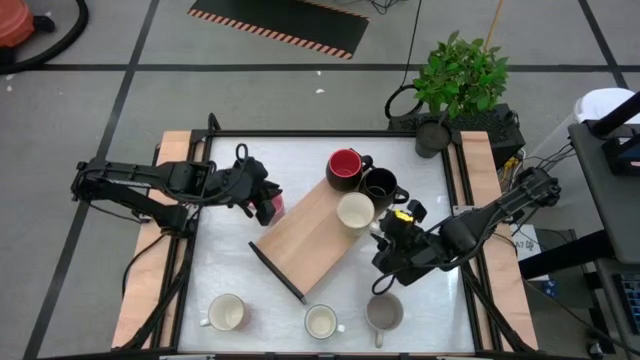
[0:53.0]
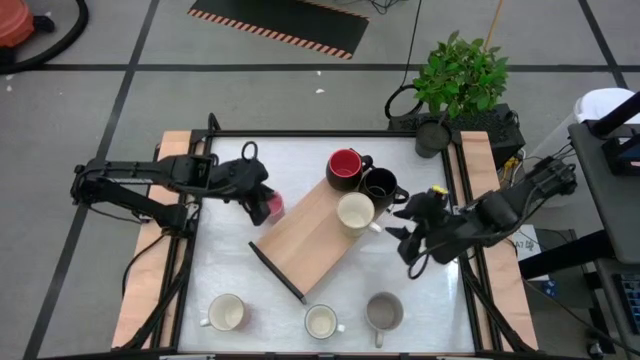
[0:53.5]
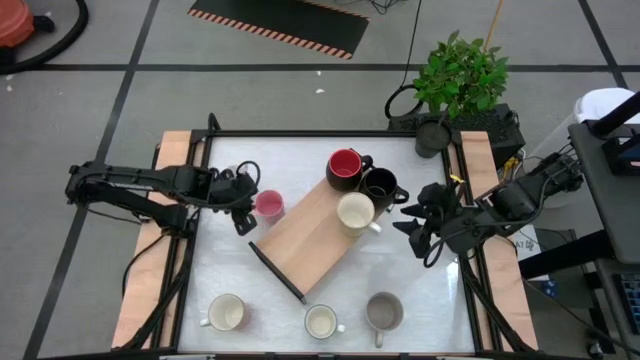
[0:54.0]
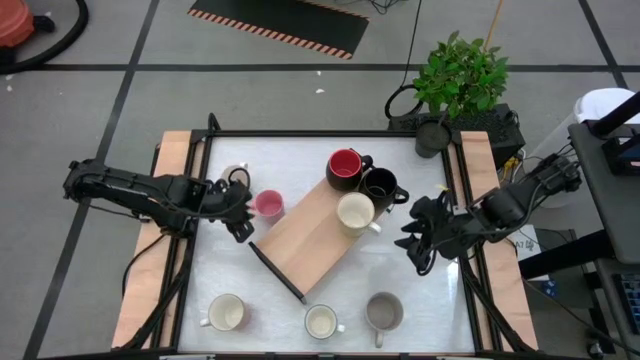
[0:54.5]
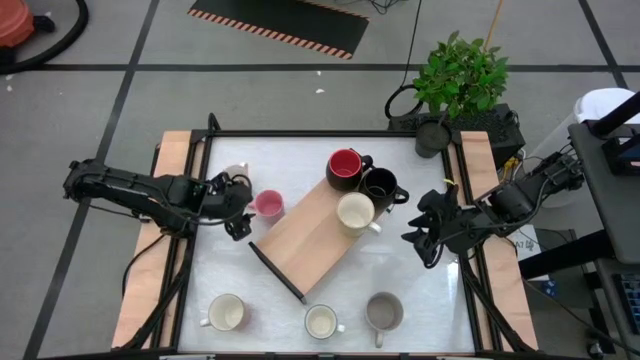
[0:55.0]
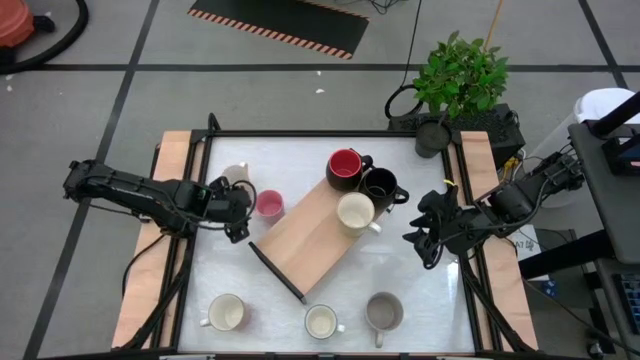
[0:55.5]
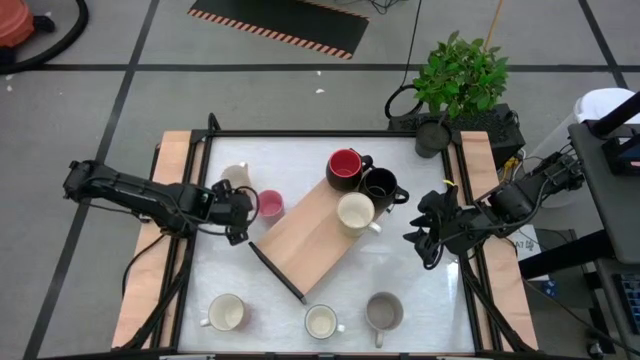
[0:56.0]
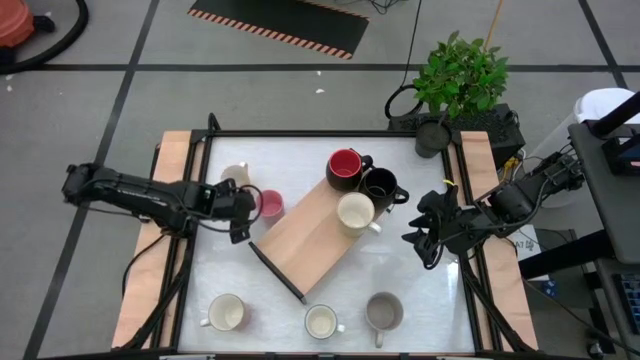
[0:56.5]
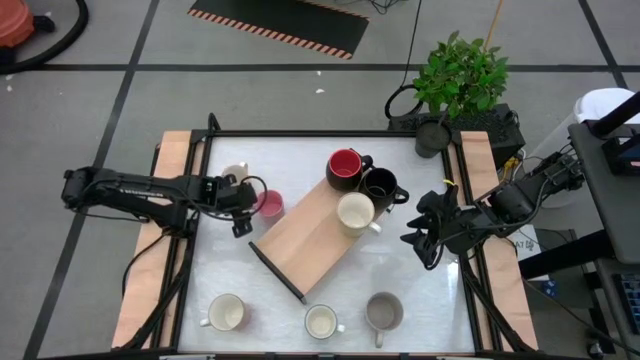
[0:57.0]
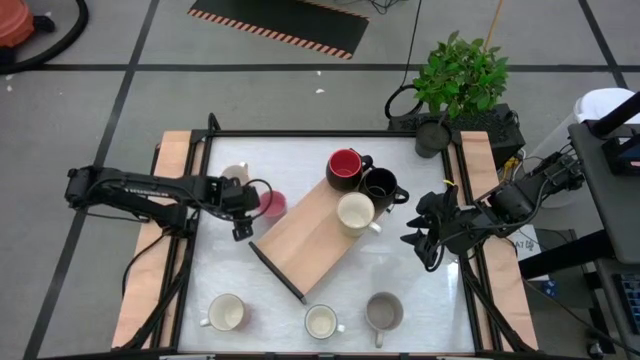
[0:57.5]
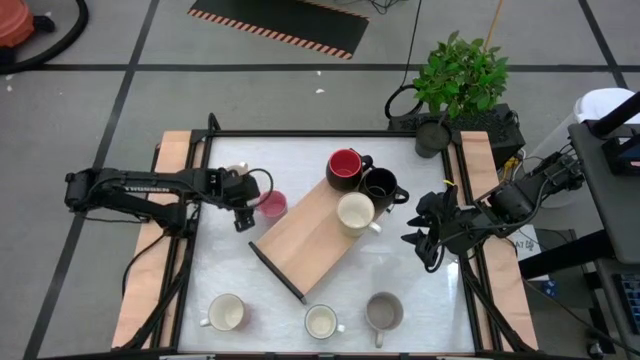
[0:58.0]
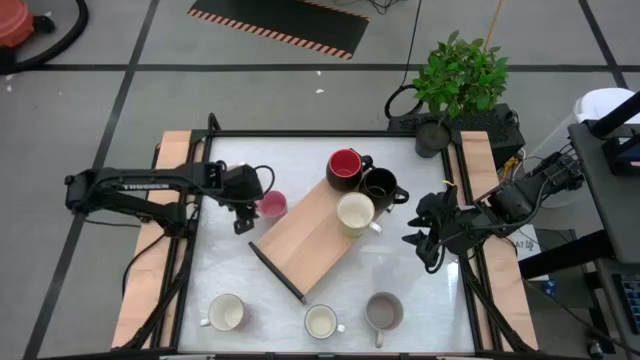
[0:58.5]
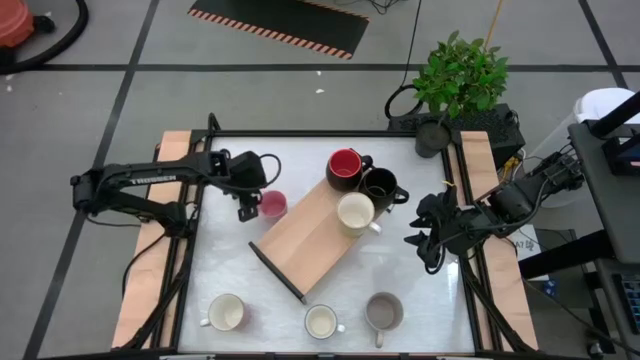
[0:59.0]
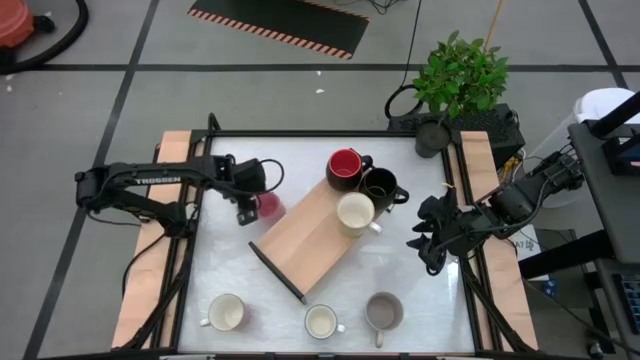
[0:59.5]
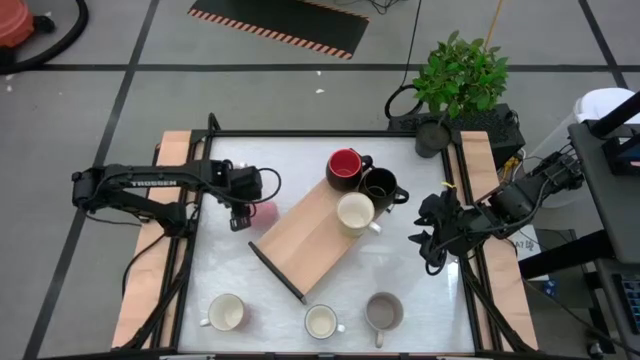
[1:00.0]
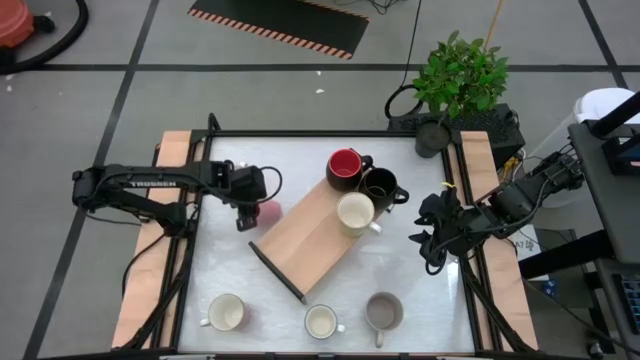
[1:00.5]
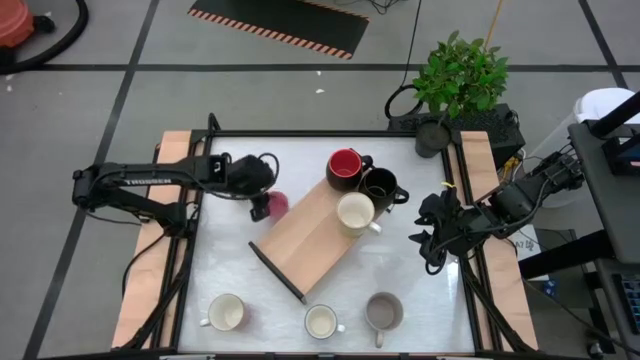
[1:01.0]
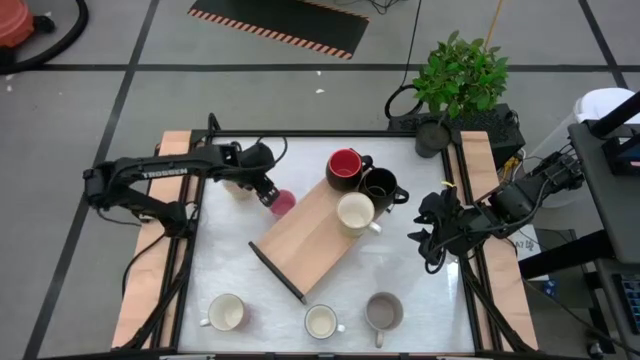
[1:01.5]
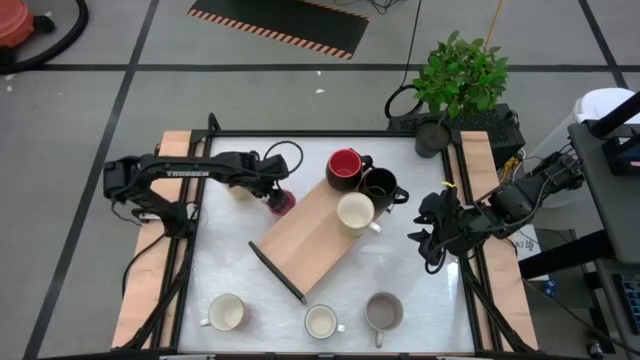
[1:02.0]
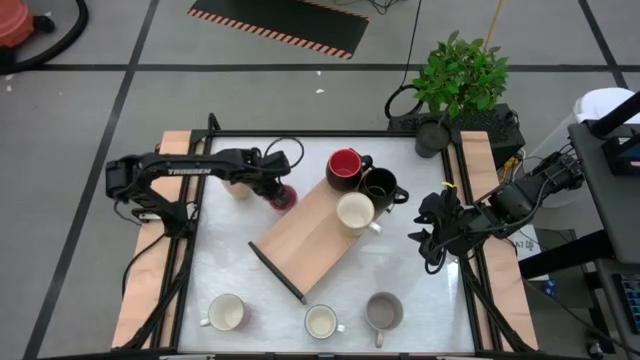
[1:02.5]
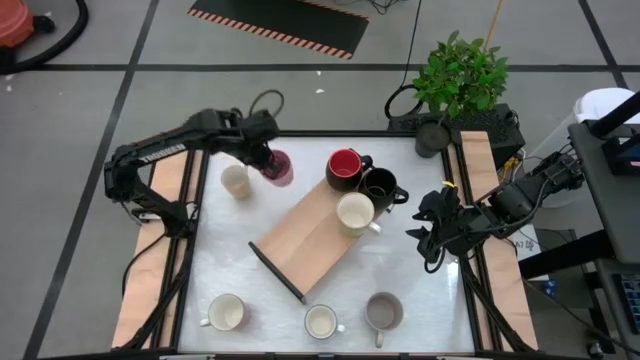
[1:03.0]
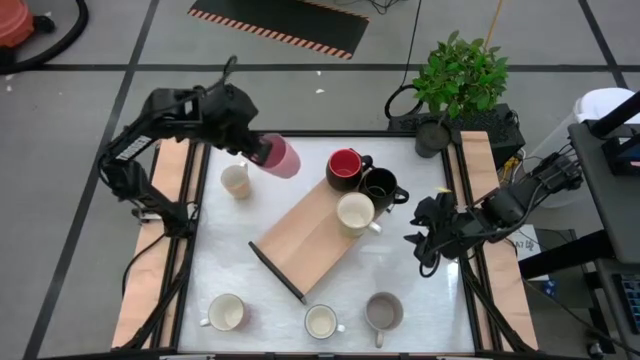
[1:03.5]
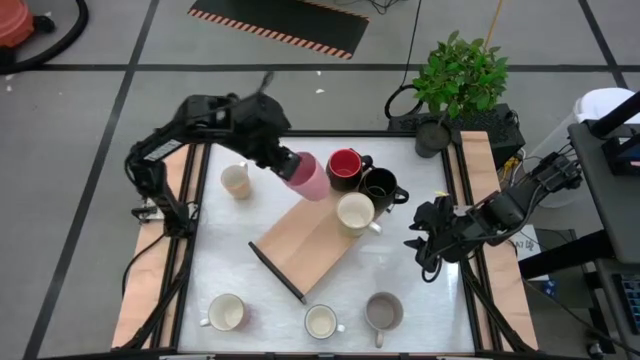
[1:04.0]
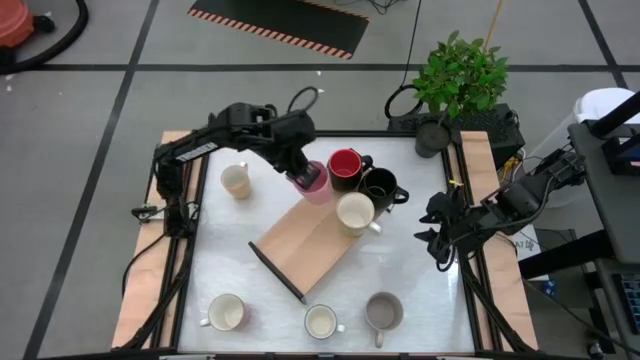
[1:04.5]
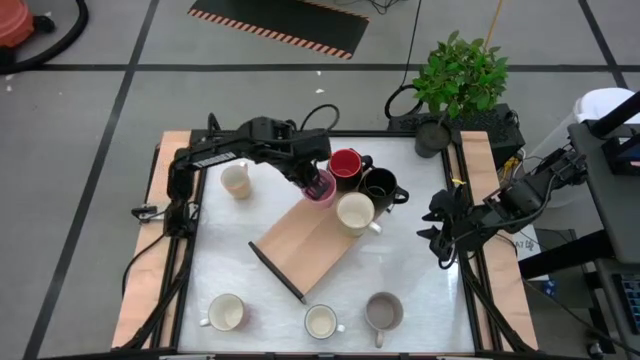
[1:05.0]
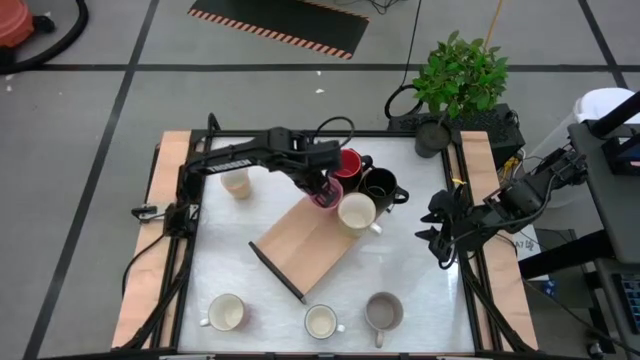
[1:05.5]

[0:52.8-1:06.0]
Task: Place coffee mugs
Put the pink mug on top of the shelf

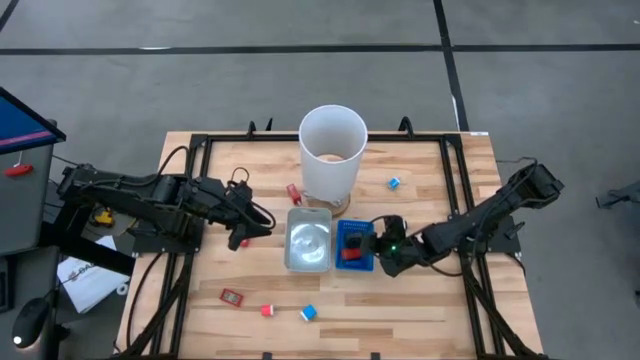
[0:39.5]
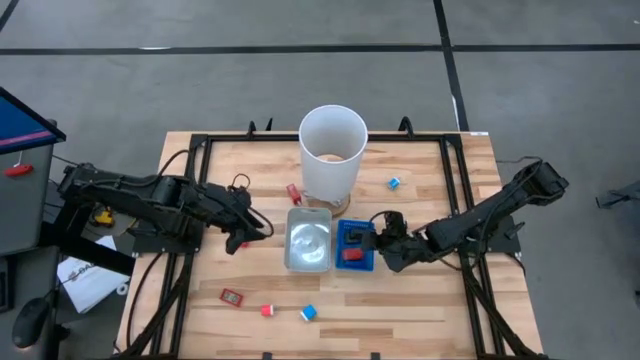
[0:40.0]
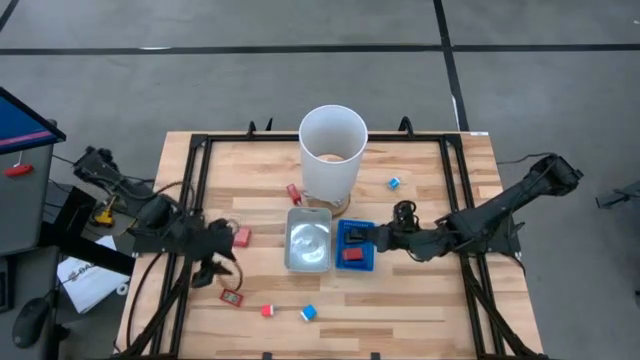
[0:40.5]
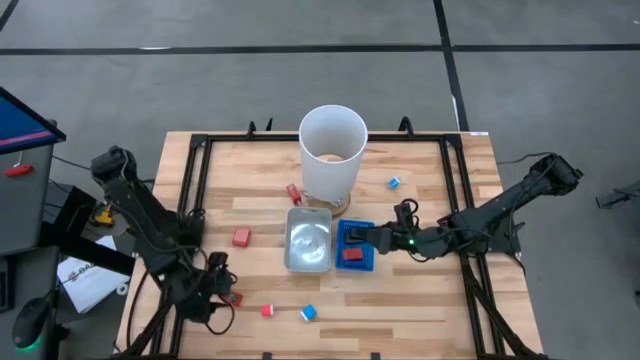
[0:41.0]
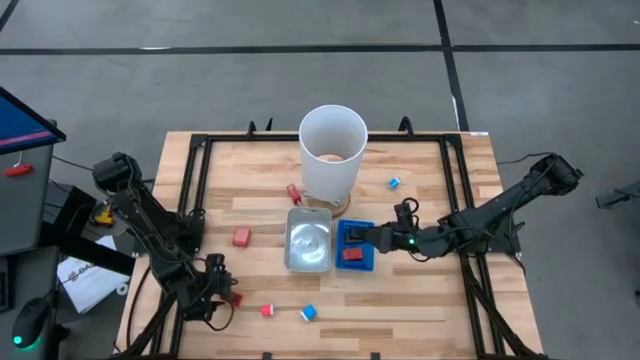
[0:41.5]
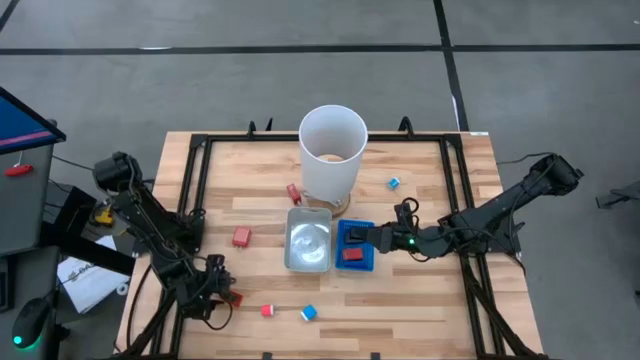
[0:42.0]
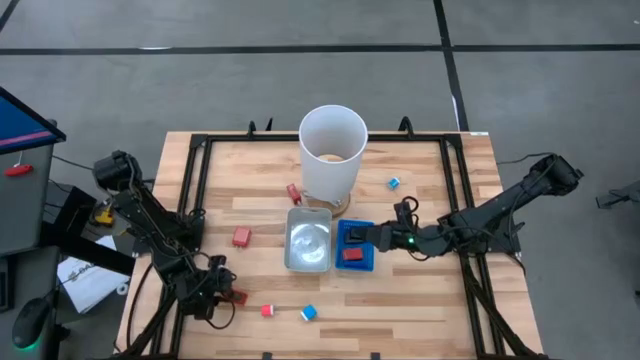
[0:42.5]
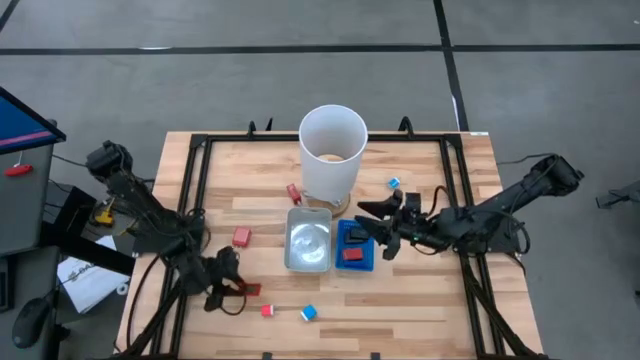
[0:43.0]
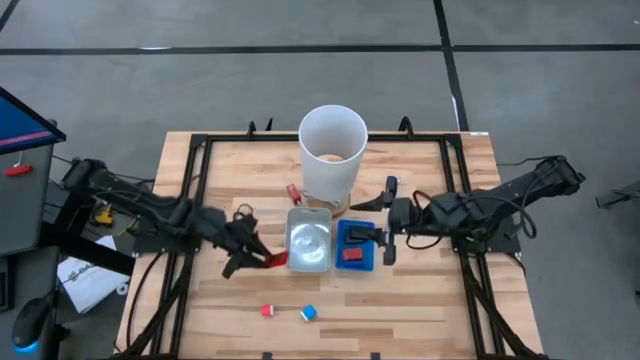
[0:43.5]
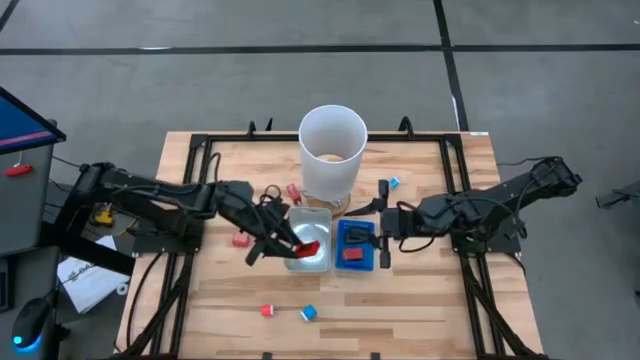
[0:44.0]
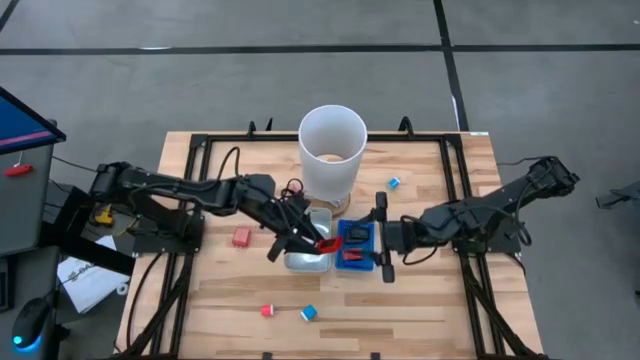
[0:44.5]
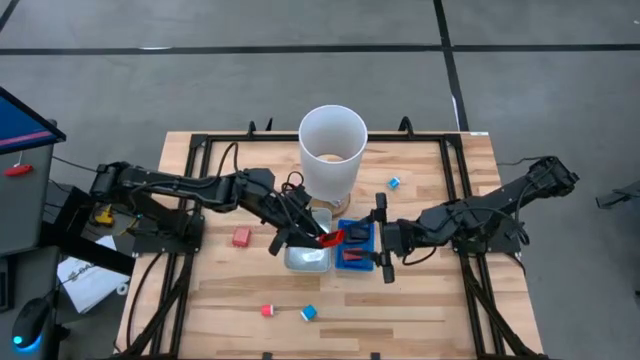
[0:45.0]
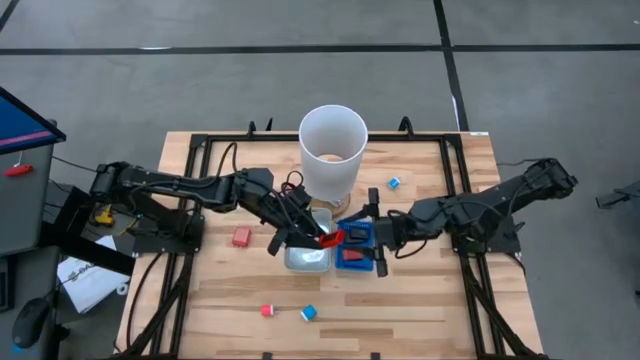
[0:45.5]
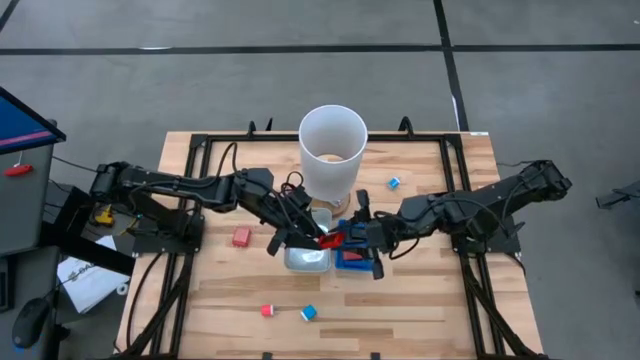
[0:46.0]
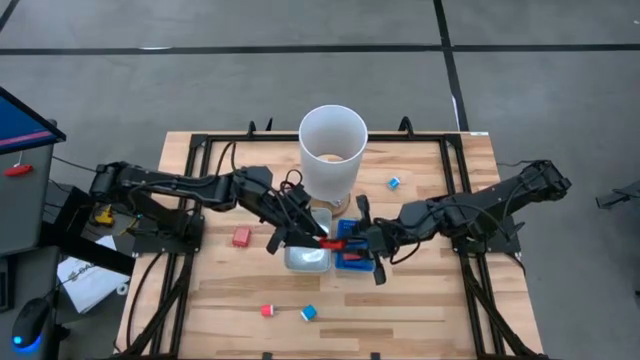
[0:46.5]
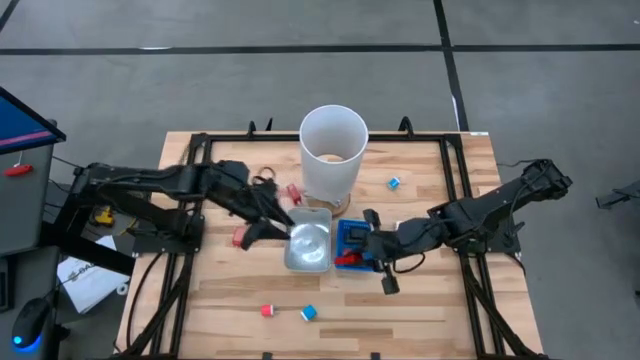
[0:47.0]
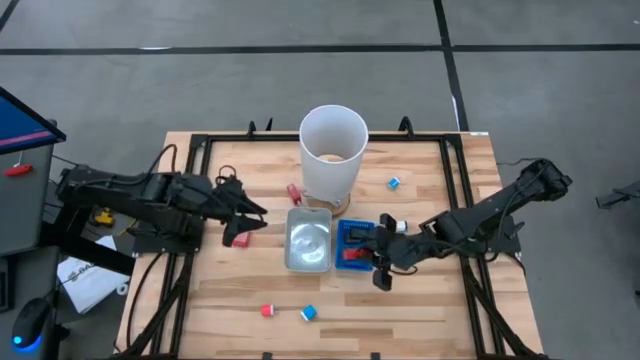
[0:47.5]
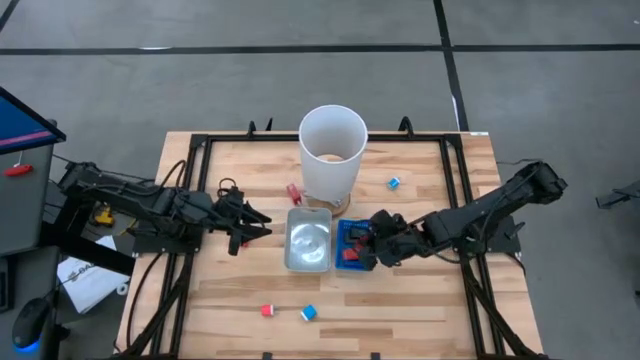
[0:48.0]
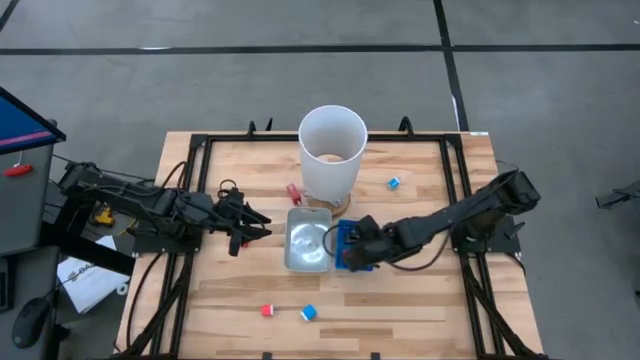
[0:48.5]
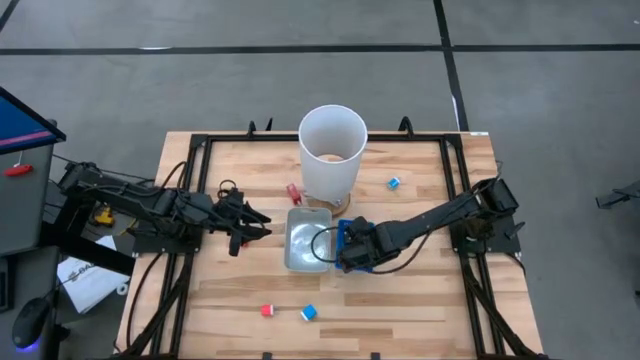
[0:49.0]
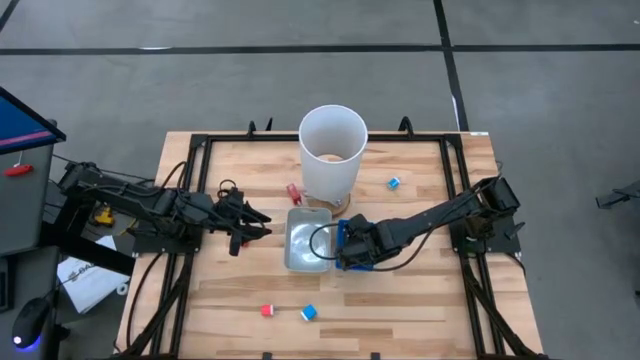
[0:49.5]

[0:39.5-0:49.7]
Task: Pick & Place Office items
Put the red digital clock into the blue bin
